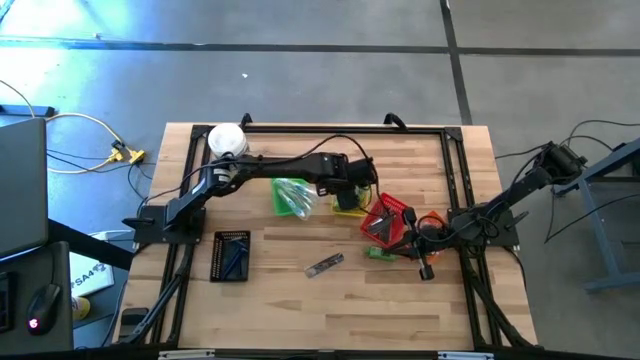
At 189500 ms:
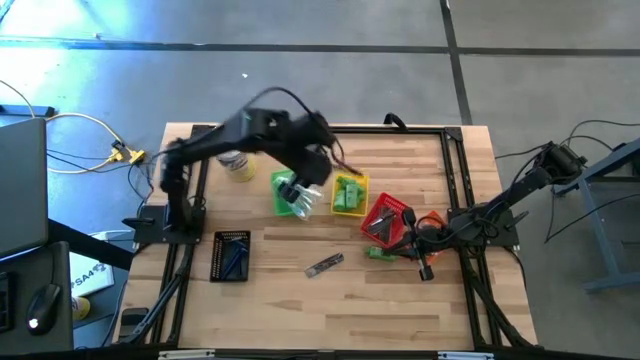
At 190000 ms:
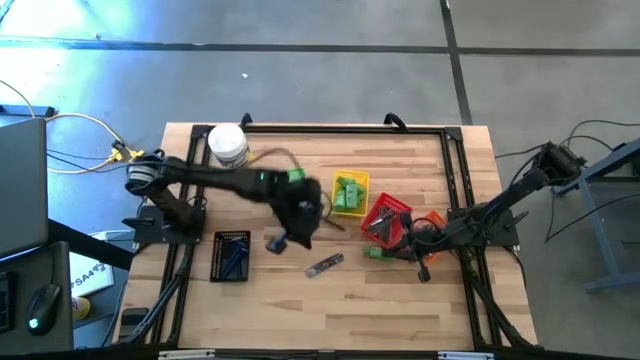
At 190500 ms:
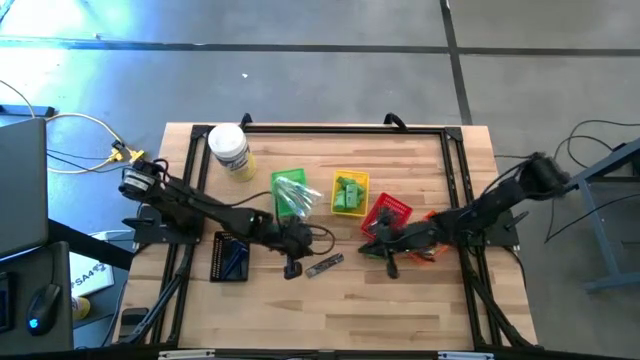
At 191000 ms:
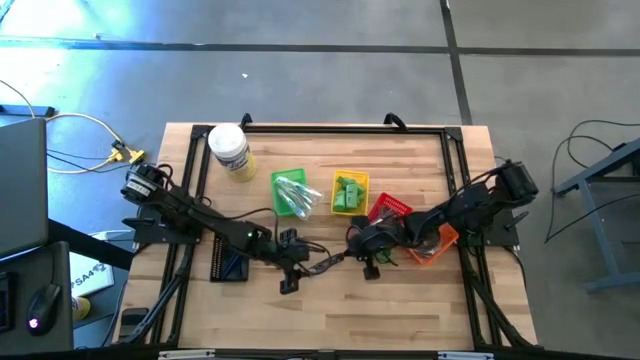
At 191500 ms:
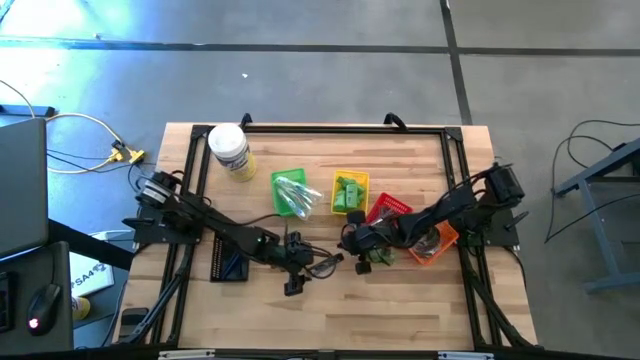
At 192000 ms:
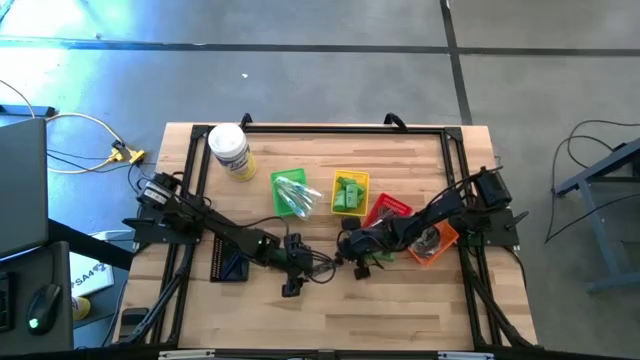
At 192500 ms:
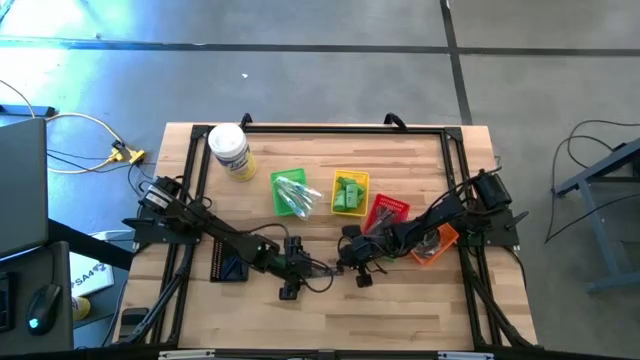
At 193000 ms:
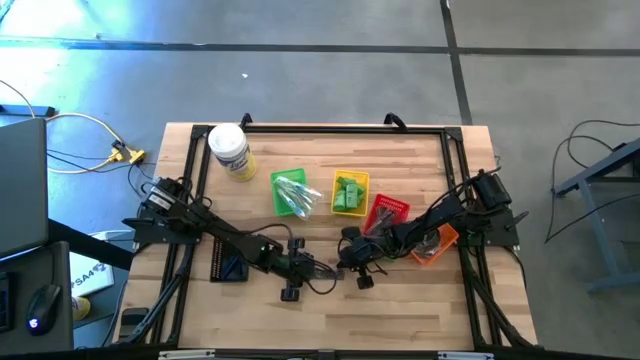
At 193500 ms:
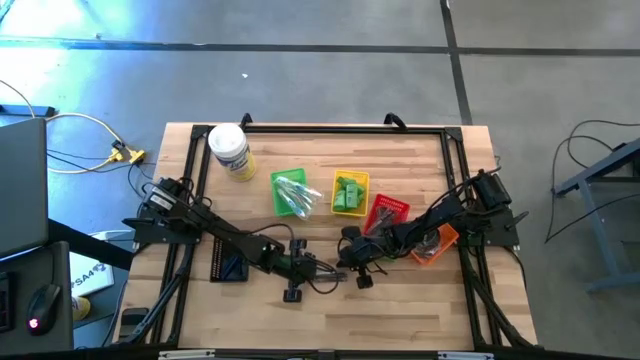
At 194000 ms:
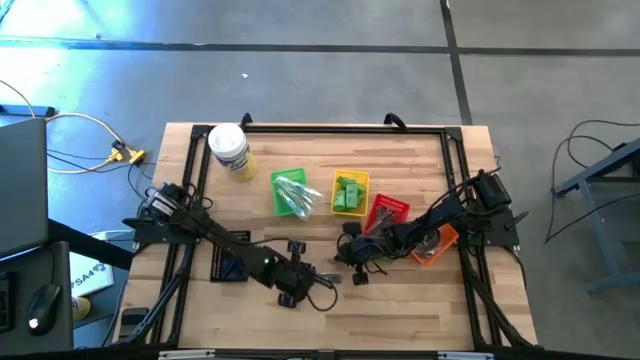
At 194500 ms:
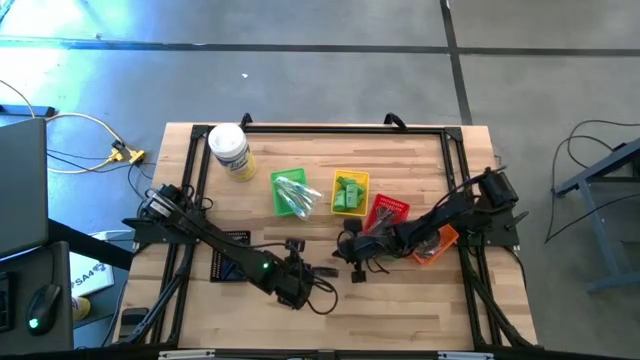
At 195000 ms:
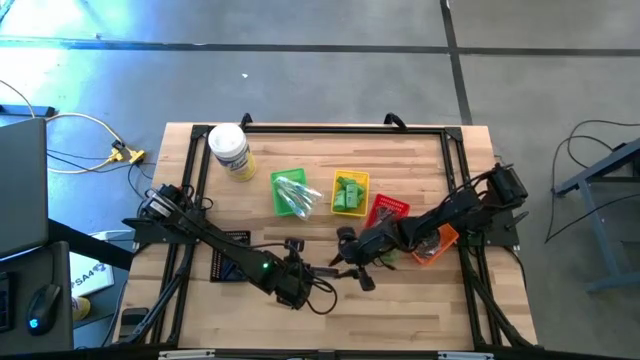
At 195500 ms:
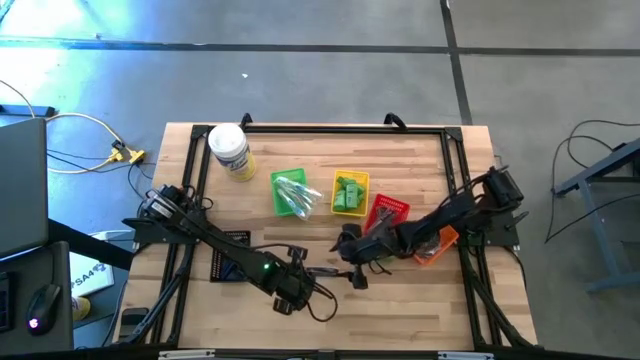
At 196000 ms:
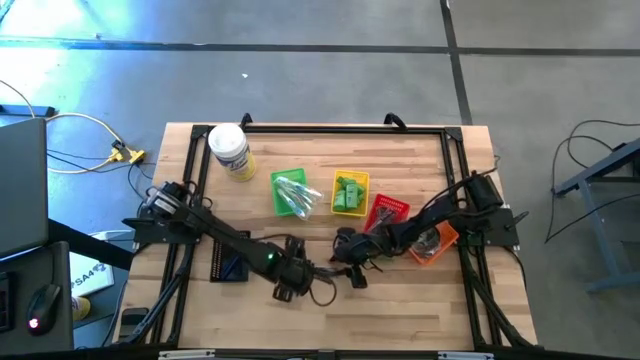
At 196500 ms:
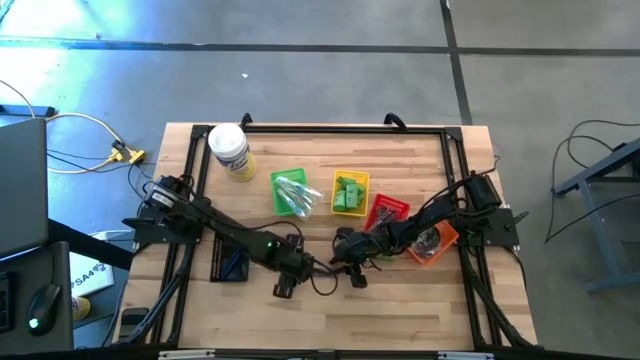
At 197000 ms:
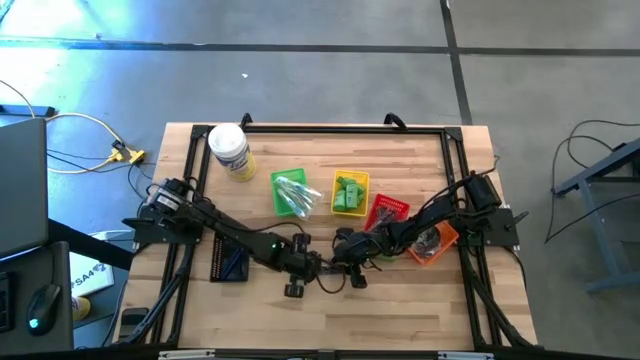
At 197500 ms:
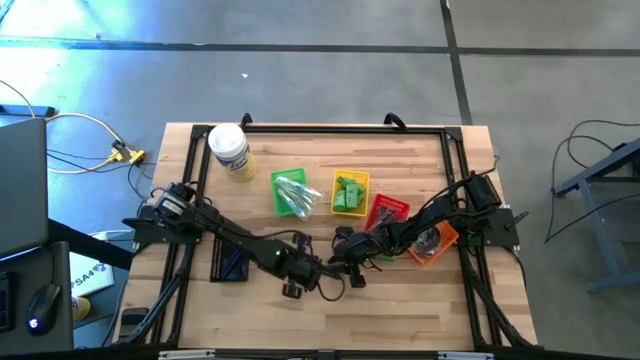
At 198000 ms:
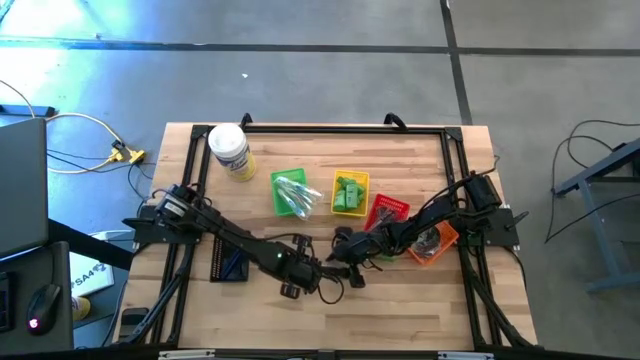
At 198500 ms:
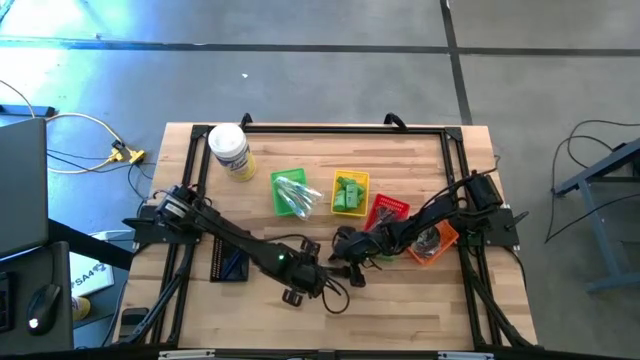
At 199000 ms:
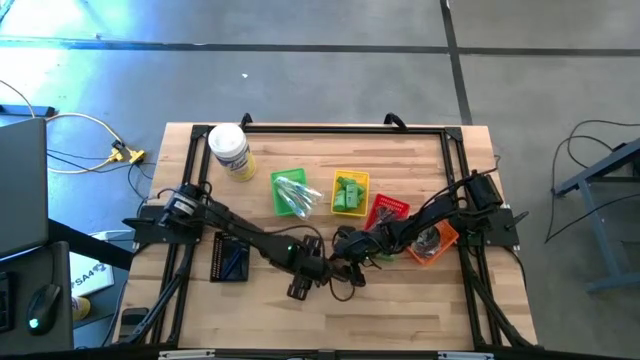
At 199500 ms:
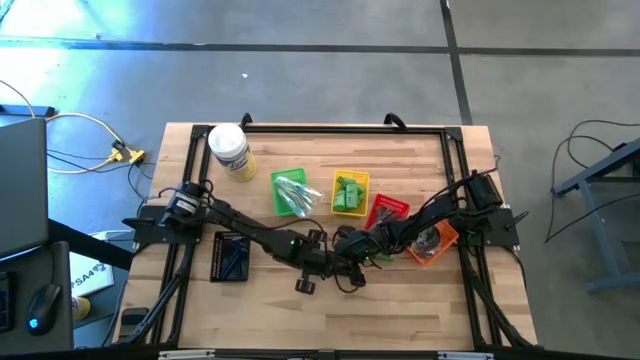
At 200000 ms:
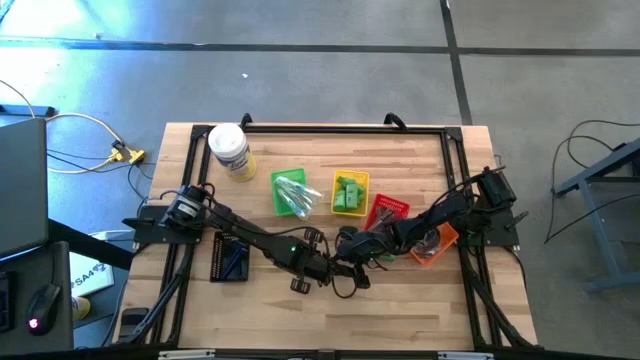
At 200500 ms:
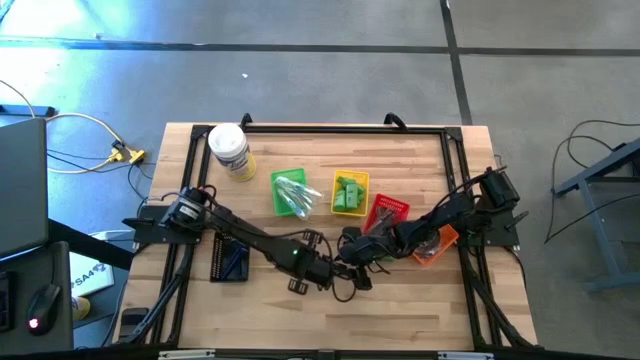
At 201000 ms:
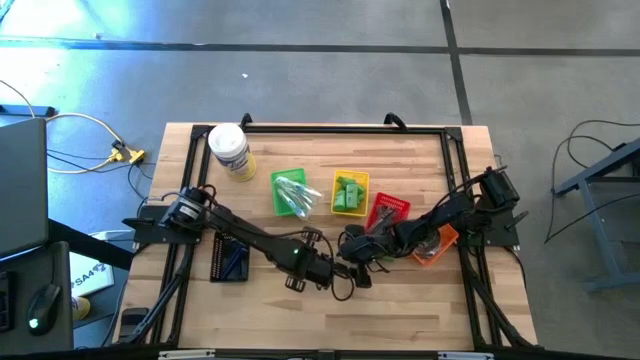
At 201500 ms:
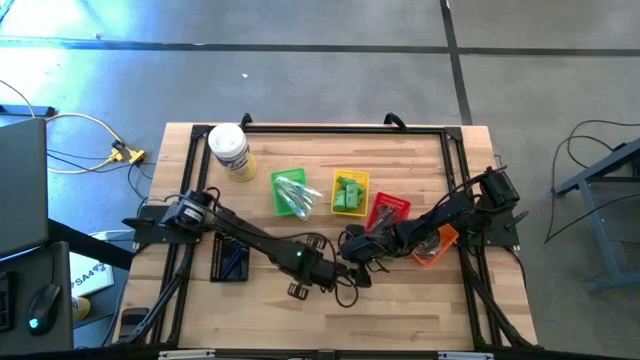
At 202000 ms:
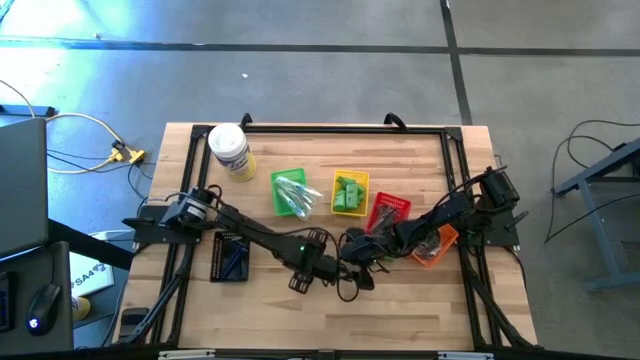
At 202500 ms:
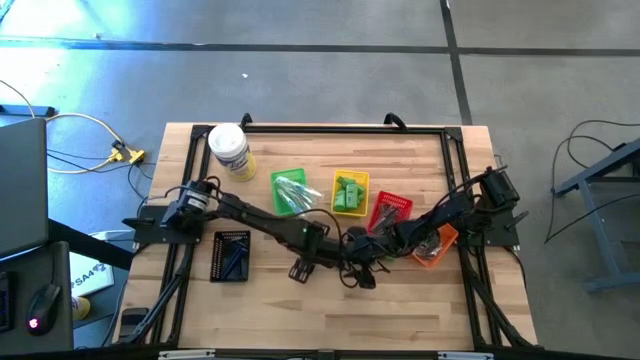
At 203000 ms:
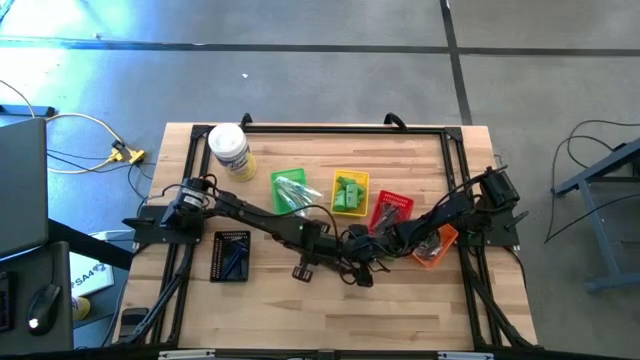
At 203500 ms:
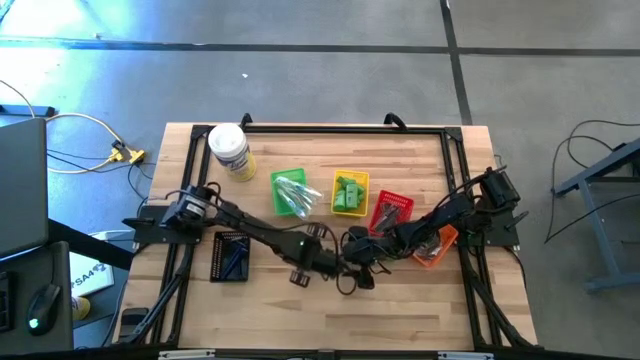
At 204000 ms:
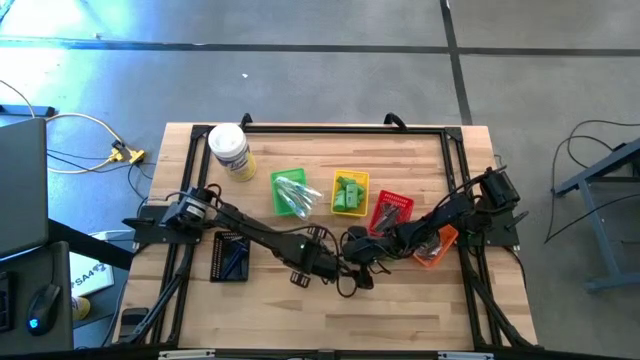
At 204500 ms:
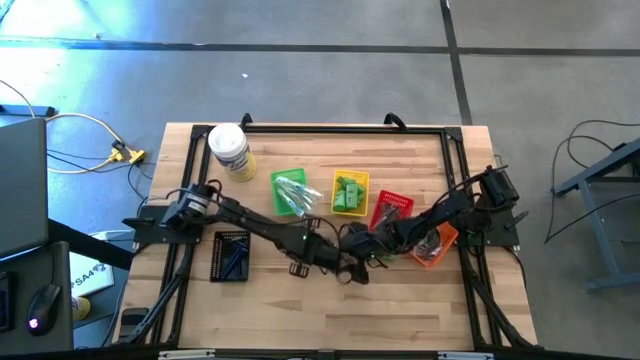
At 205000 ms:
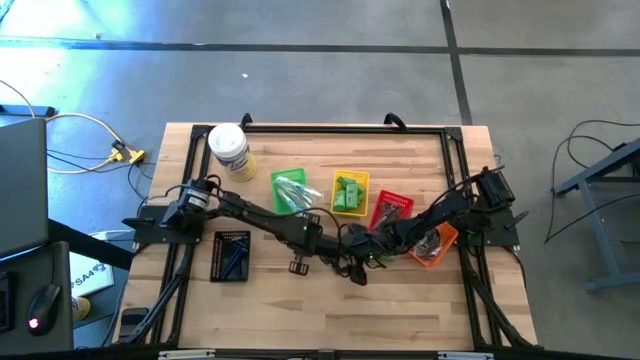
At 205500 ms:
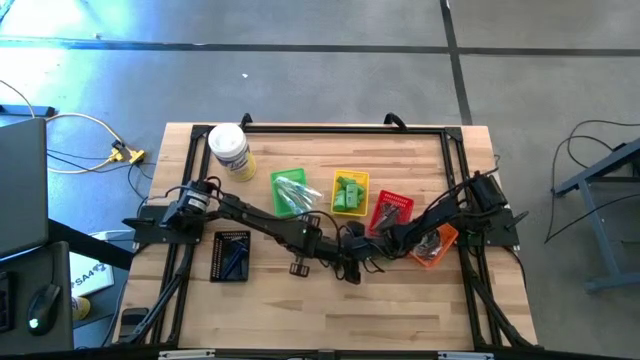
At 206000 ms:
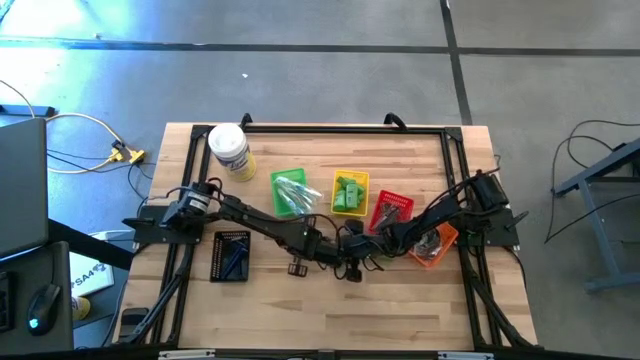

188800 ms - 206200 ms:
Task: Pick & Place Travel size toiletries
Put the black hair comb into the red bin

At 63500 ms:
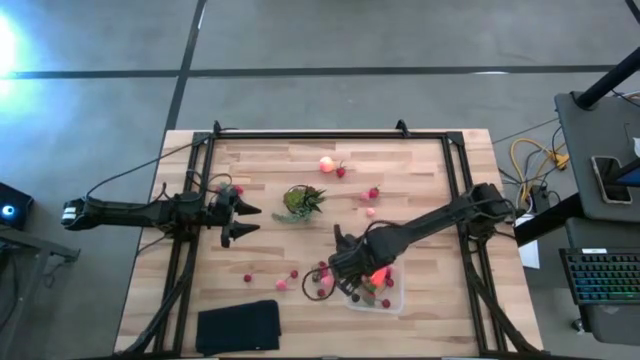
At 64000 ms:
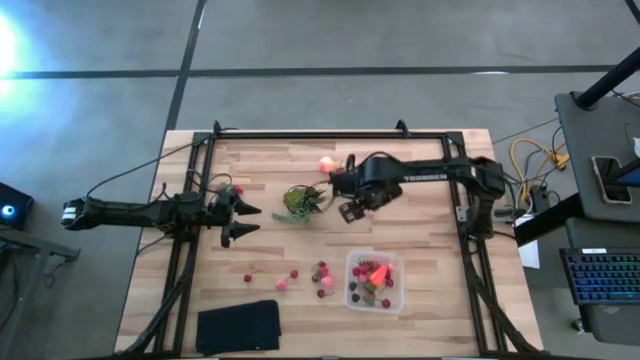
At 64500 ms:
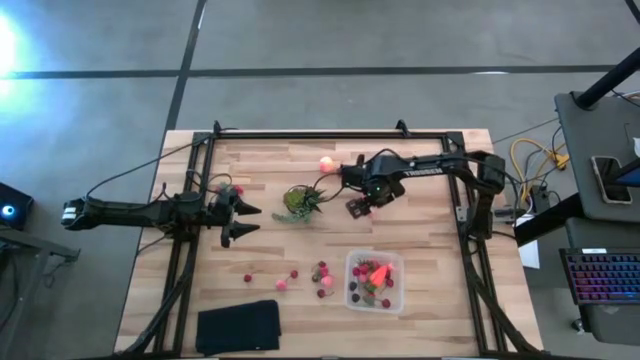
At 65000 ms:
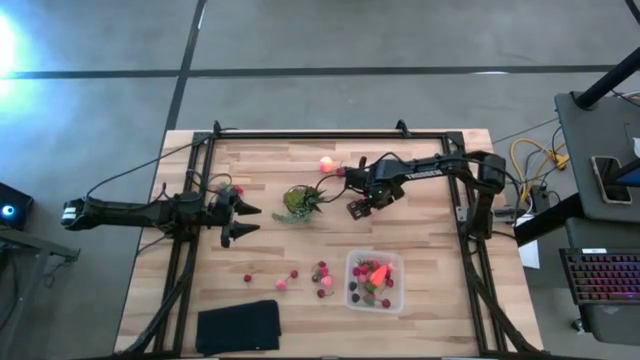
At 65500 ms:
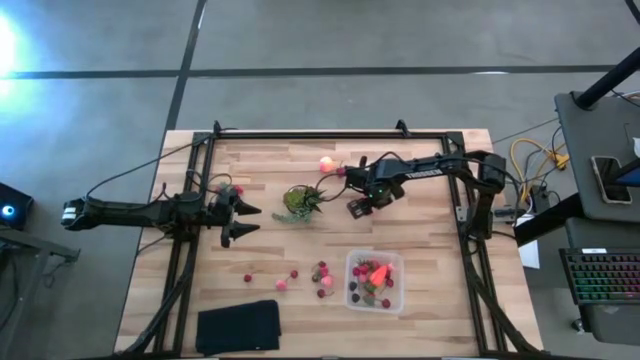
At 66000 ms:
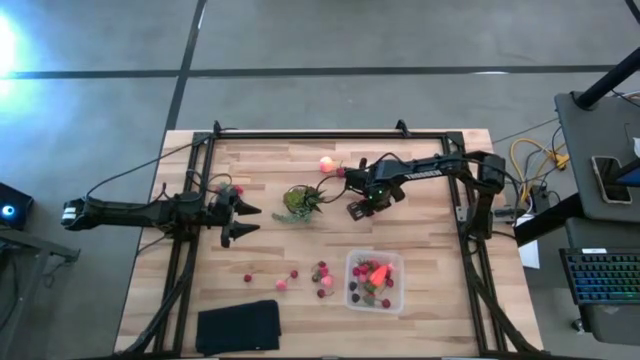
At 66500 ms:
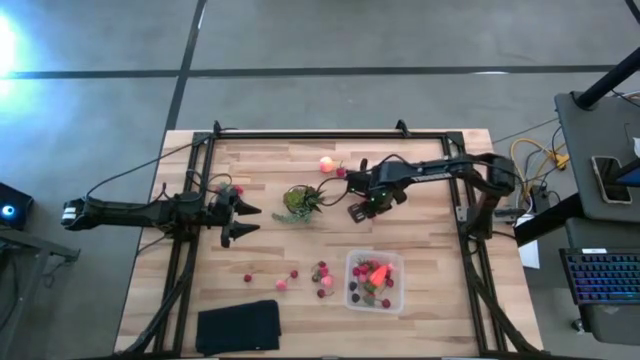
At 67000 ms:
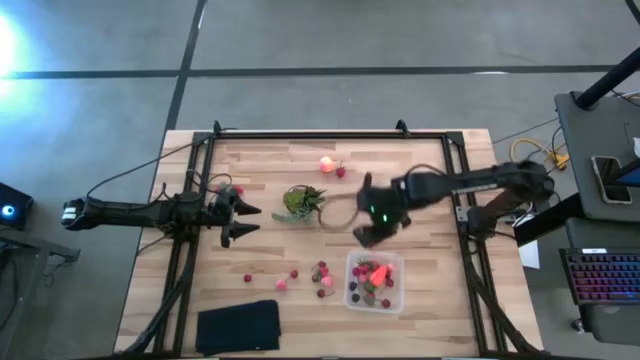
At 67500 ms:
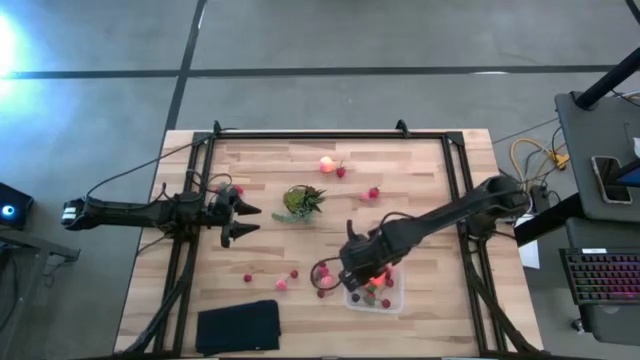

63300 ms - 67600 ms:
Task: Pick and placing Produce into tupperware
Put the apricot into the bin
